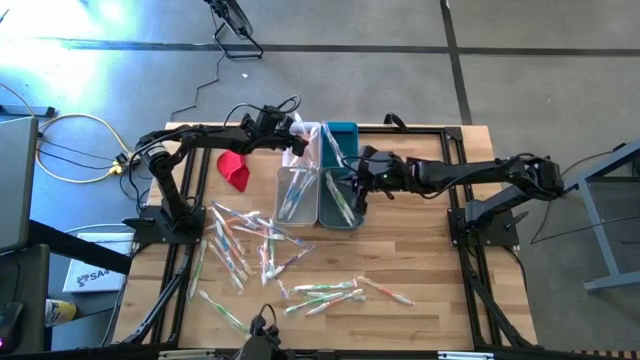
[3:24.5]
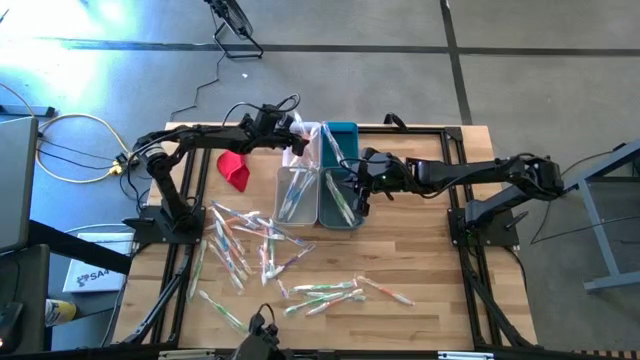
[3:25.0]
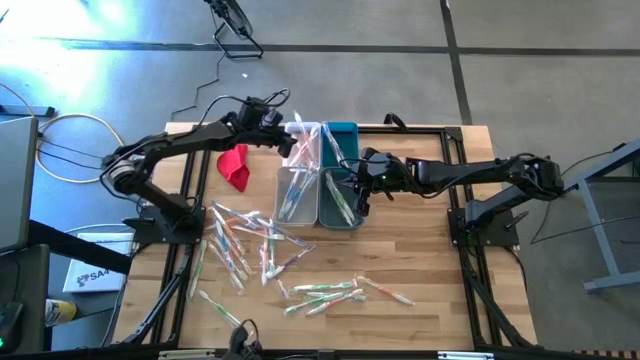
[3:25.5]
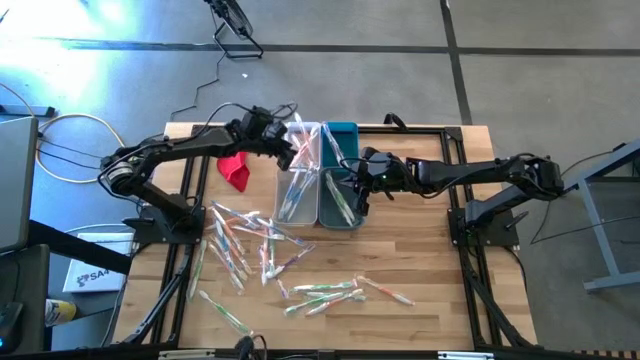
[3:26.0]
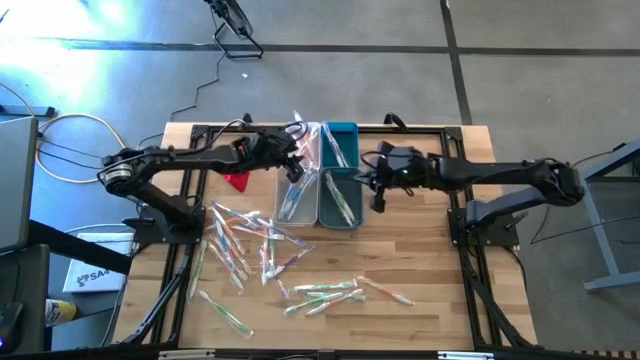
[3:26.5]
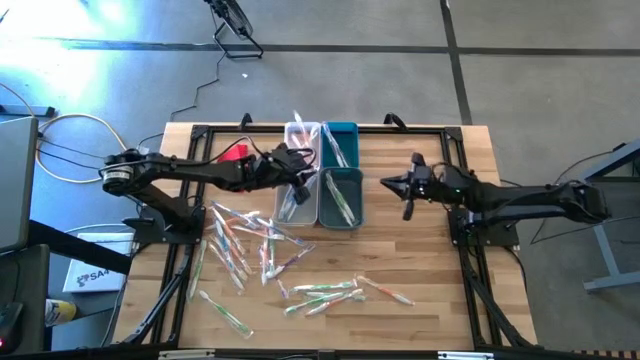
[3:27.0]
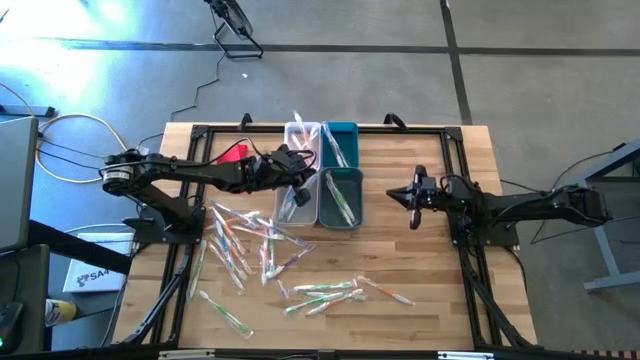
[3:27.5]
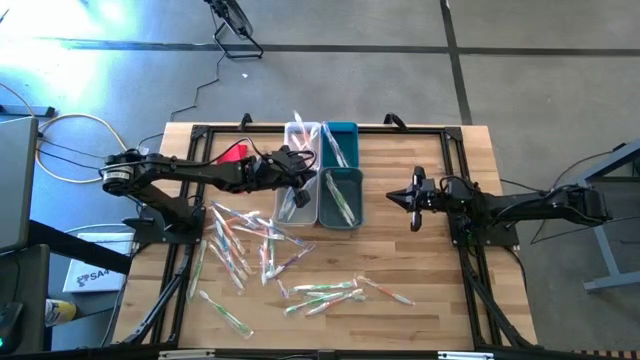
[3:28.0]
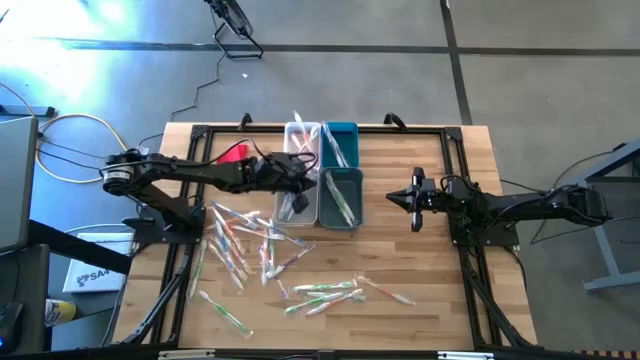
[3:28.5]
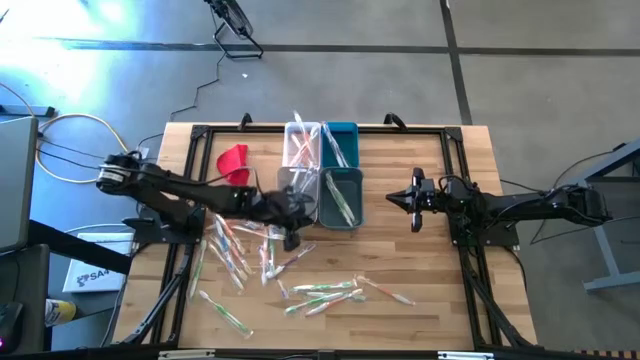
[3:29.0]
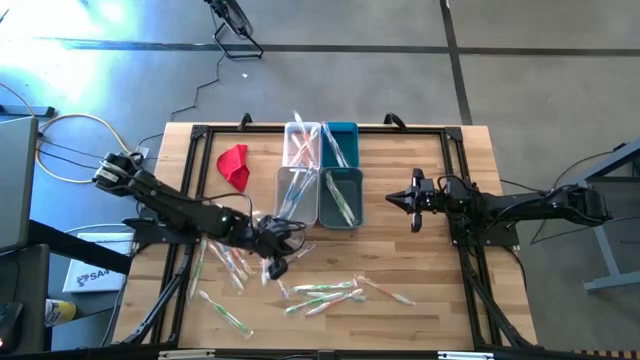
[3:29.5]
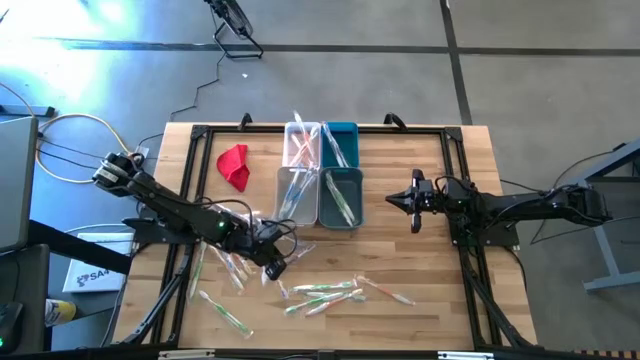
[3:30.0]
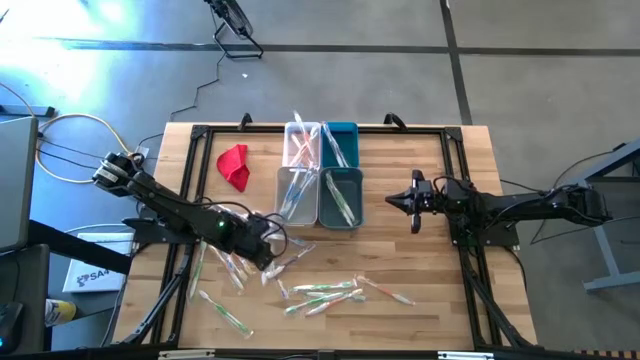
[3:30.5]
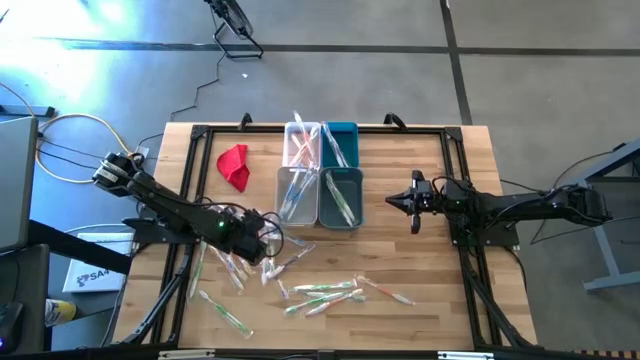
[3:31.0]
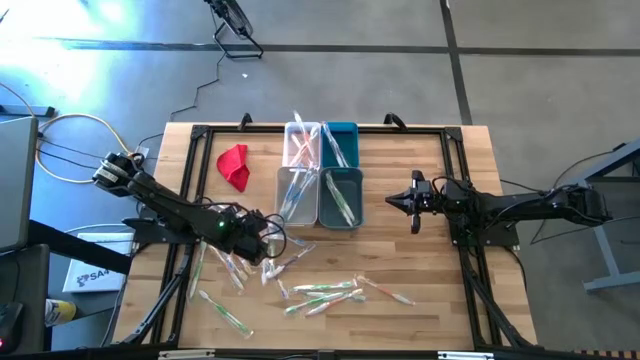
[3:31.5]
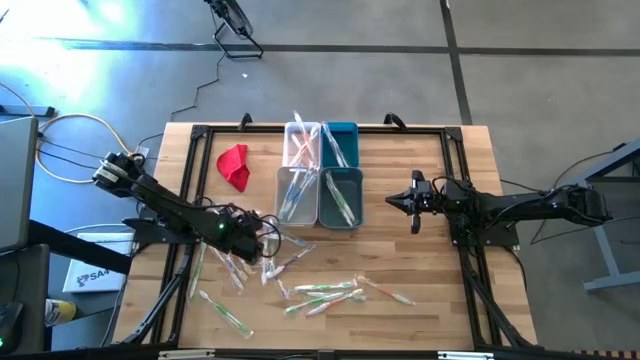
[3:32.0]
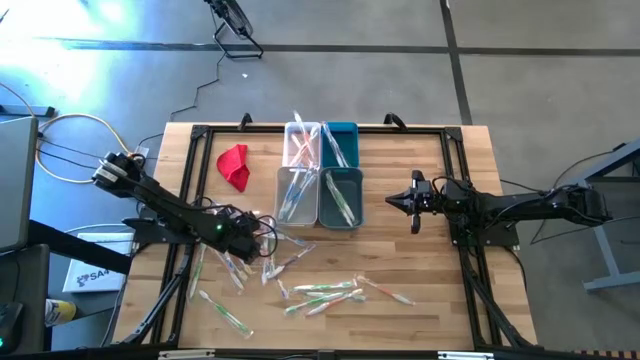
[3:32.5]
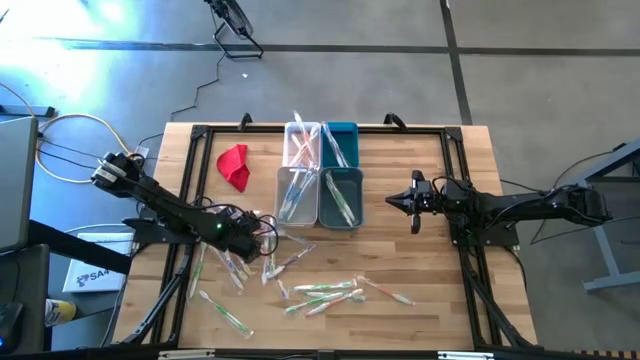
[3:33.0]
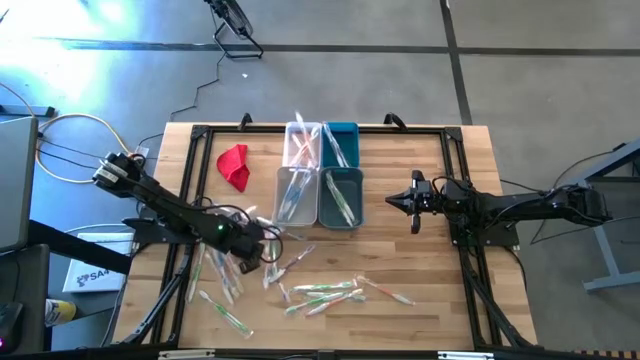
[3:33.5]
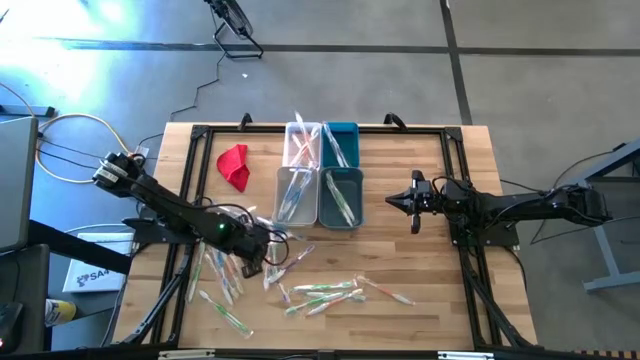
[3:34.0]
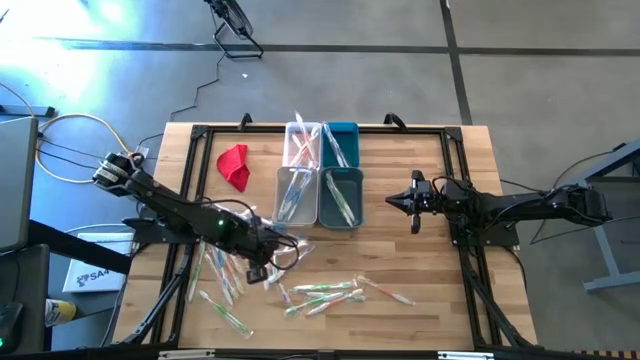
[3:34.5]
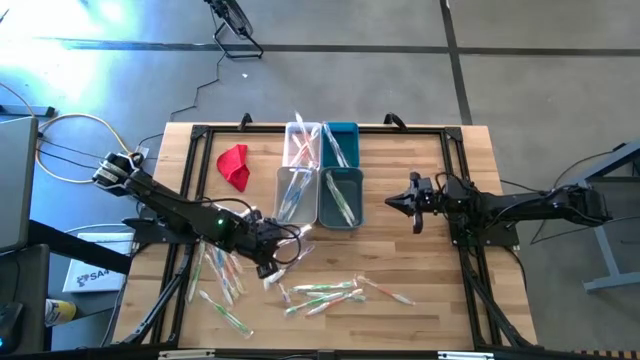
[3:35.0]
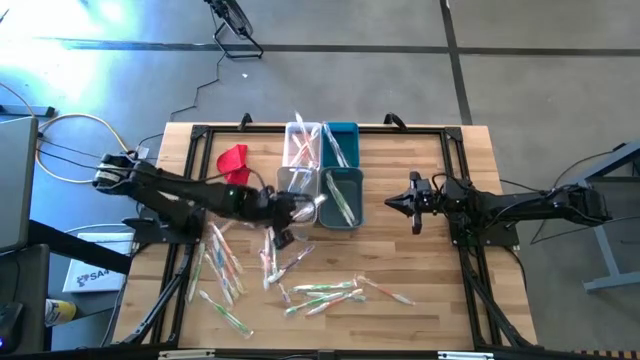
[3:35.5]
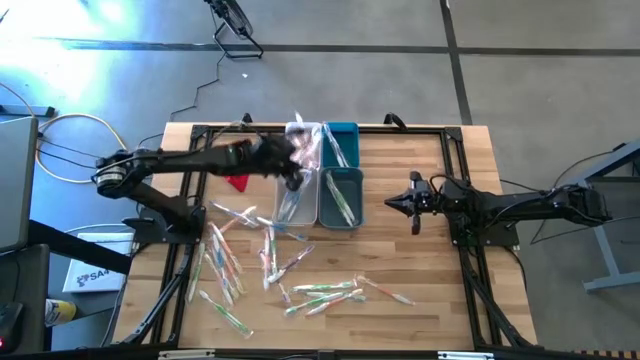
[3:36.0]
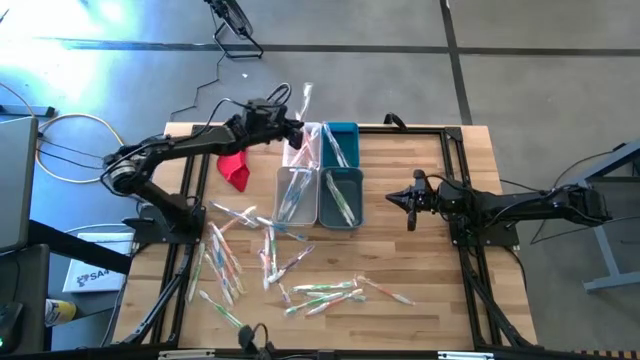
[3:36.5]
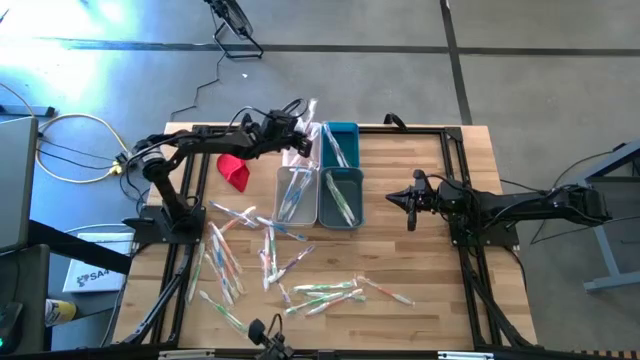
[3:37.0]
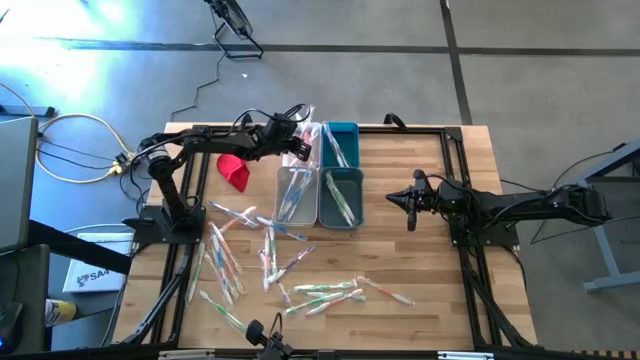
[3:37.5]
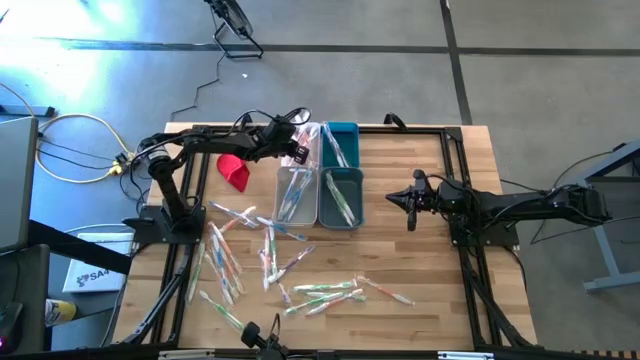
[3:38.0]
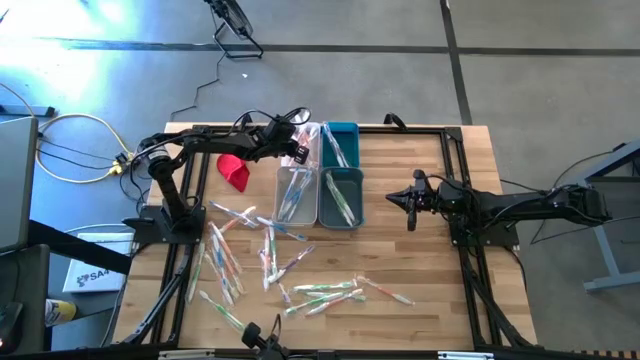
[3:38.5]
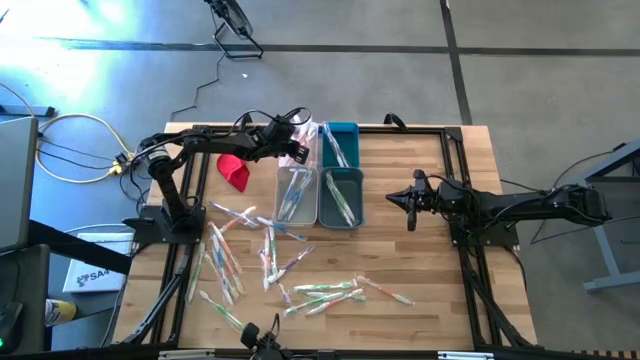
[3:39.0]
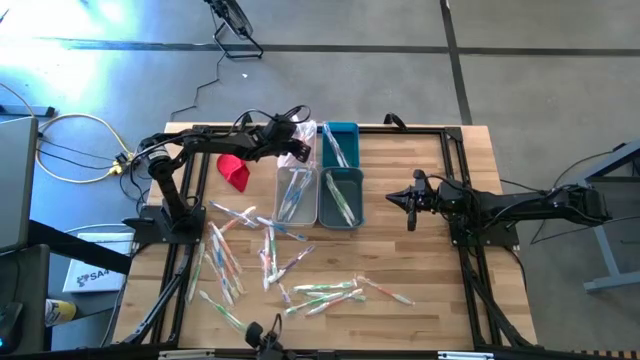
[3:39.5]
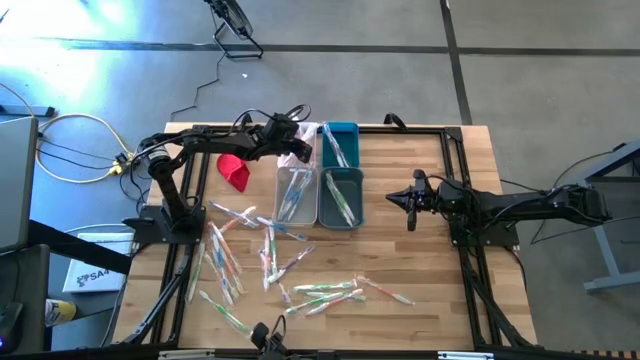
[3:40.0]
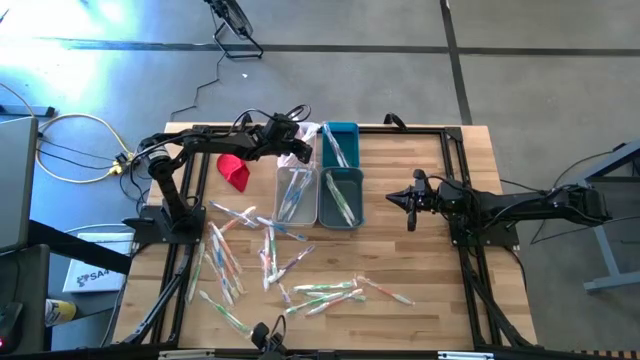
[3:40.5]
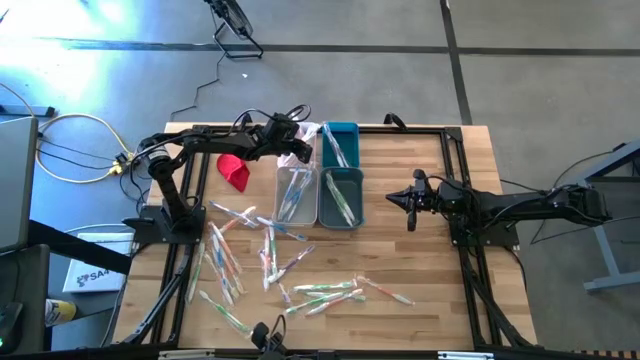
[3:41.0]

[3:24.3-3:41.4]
Task: Pick & Place Toothbrushes
Put the orange toothbrush into the transparent bin

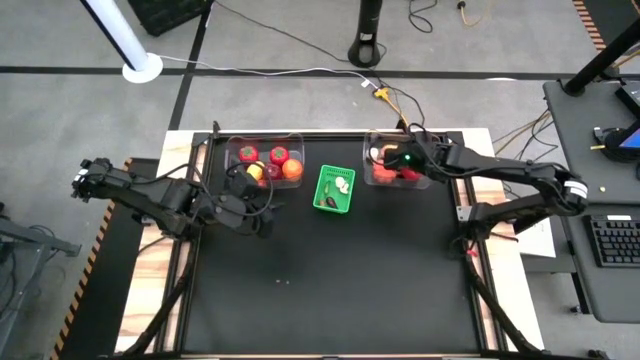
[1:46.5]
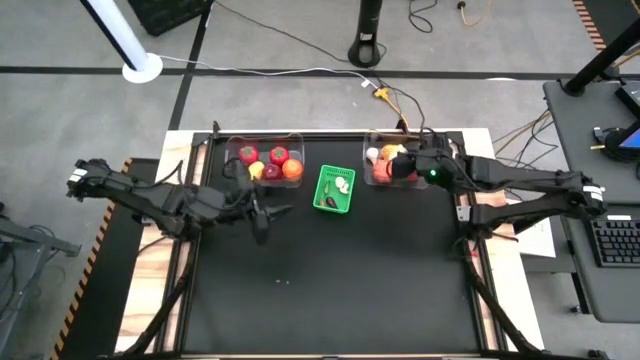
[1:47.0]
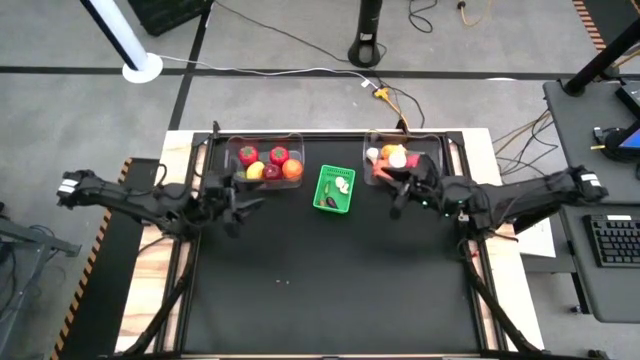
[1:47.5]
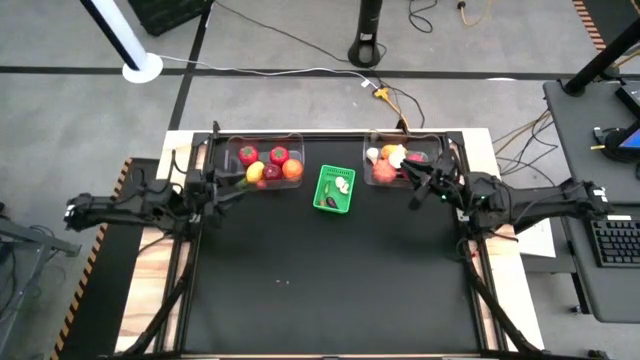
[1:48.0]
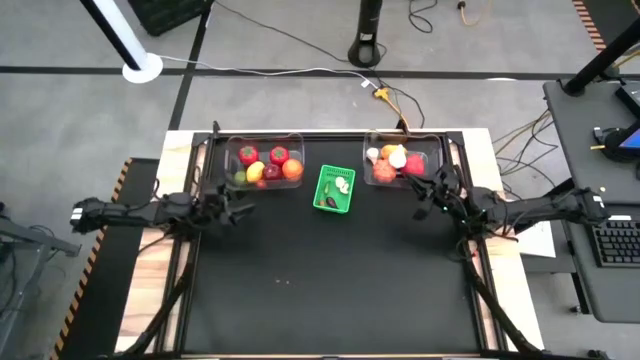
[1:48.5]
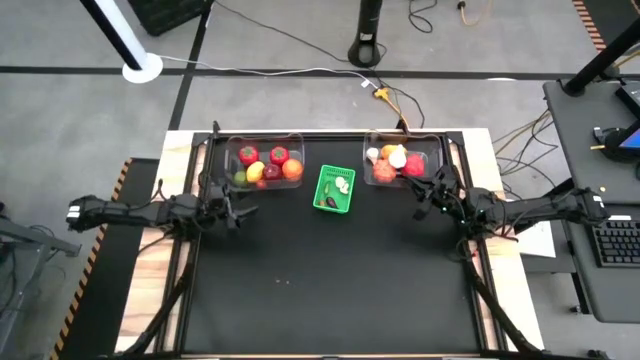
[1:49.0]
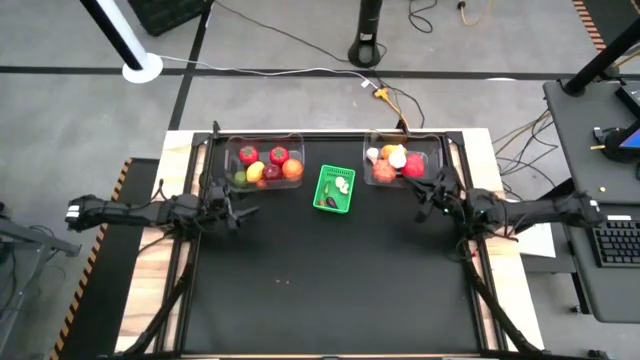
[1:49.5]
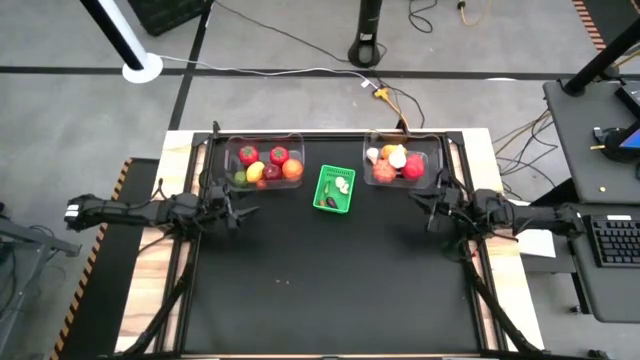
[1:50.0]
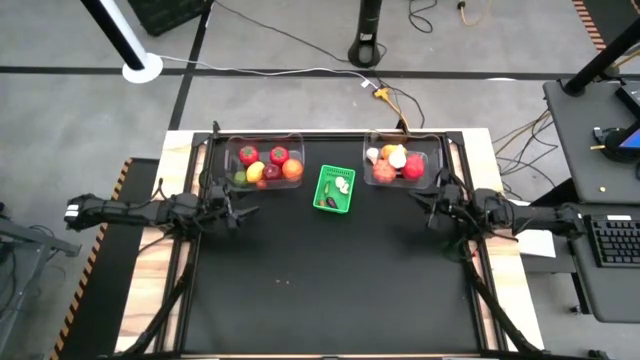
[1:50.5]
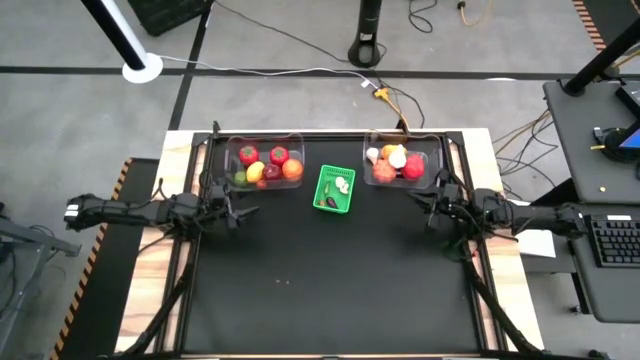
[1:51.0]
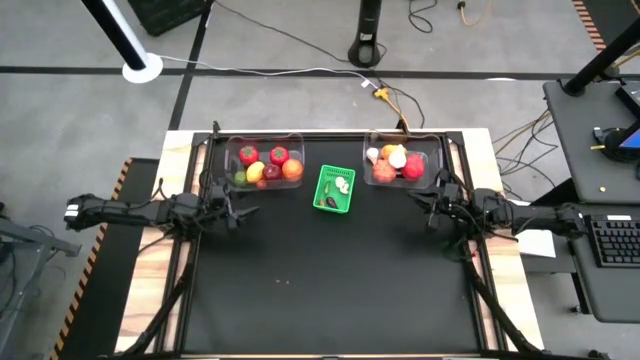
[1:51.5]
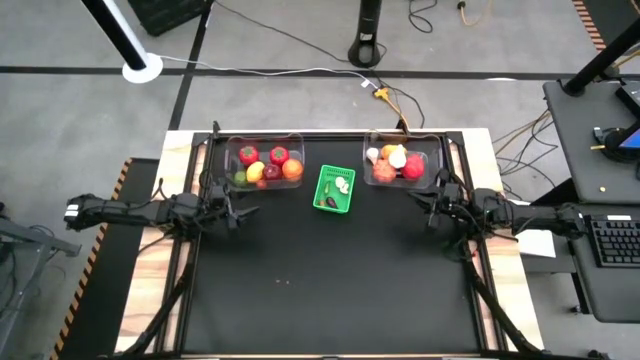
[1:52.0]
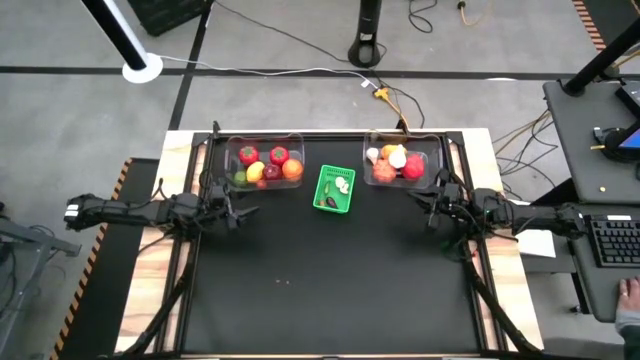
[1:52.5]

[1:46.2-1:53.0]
Task: Sort produce into baskets
Return to Home Position
